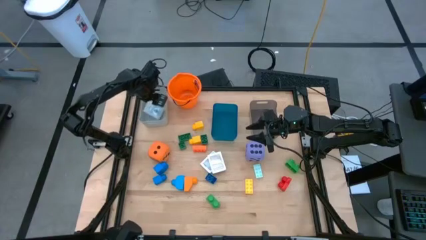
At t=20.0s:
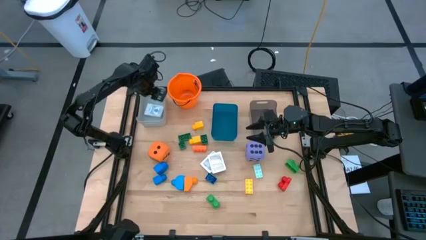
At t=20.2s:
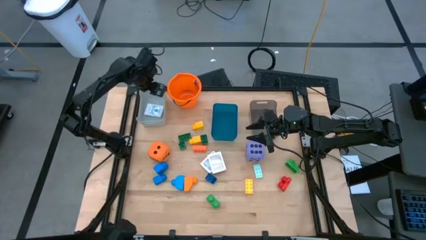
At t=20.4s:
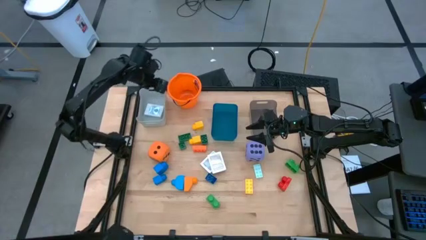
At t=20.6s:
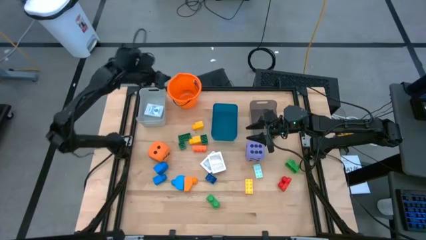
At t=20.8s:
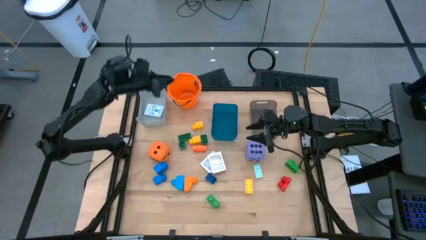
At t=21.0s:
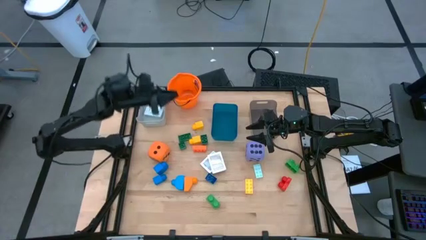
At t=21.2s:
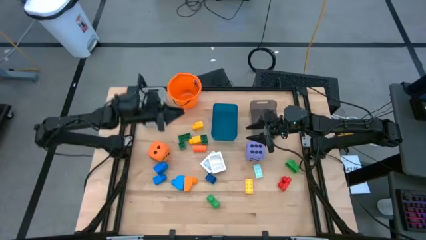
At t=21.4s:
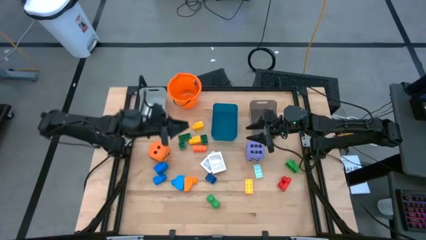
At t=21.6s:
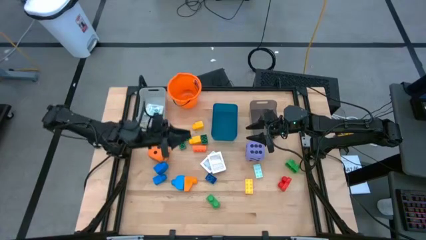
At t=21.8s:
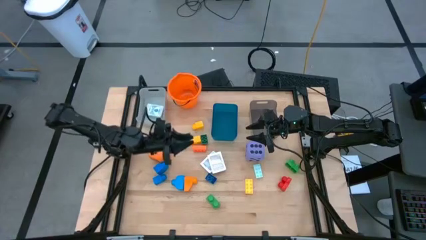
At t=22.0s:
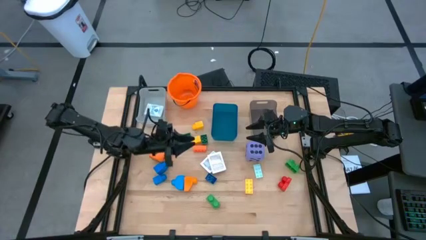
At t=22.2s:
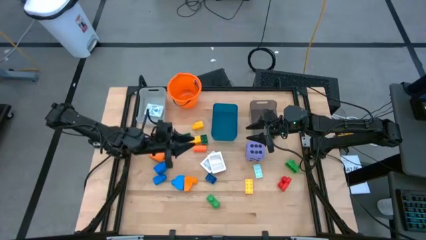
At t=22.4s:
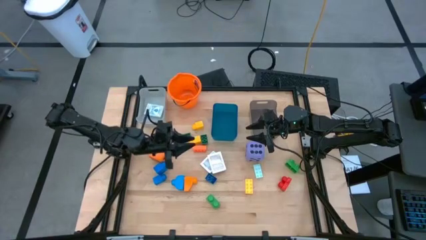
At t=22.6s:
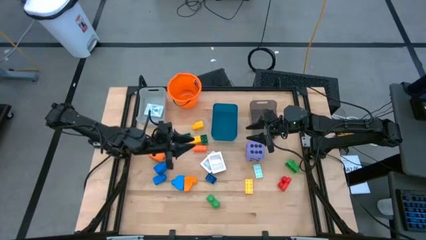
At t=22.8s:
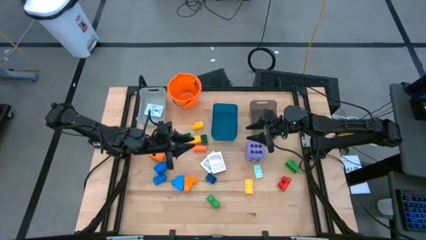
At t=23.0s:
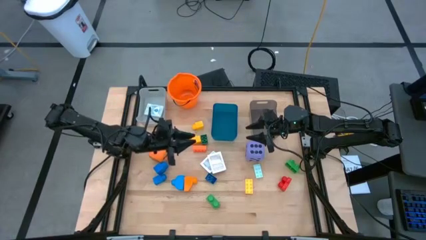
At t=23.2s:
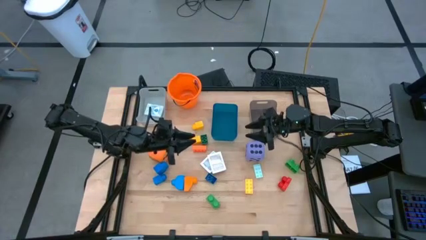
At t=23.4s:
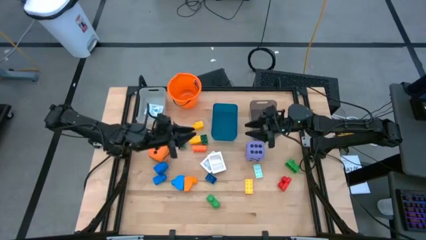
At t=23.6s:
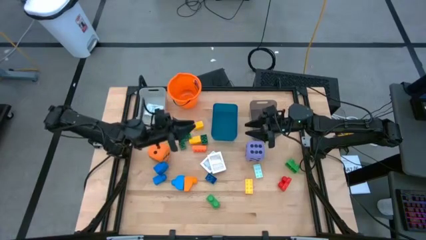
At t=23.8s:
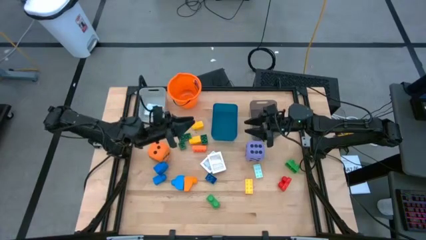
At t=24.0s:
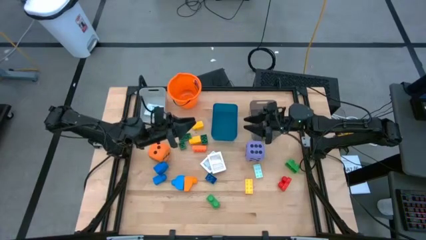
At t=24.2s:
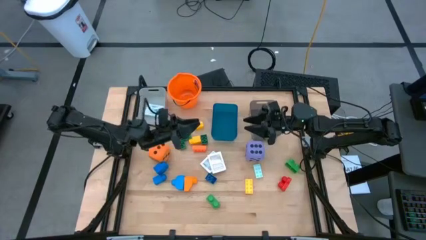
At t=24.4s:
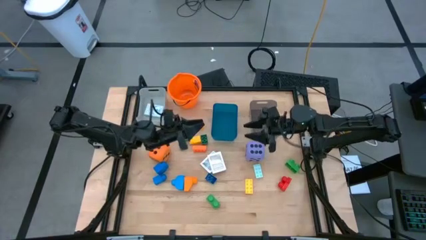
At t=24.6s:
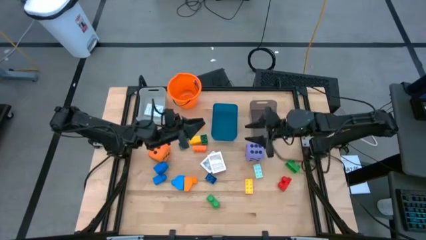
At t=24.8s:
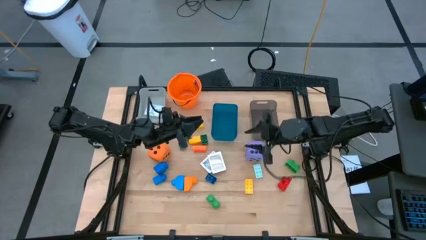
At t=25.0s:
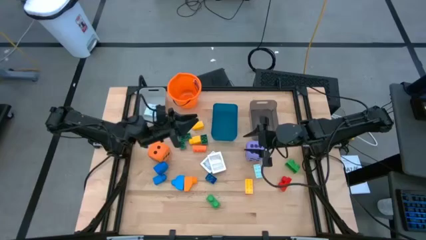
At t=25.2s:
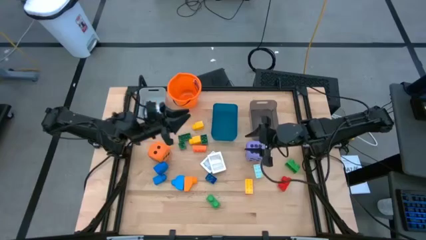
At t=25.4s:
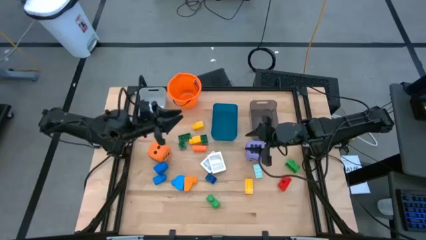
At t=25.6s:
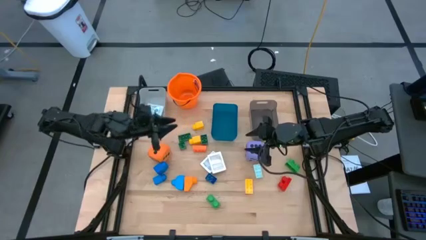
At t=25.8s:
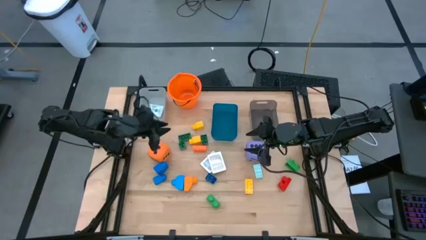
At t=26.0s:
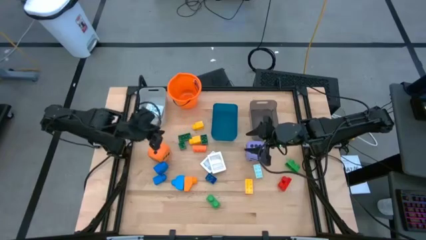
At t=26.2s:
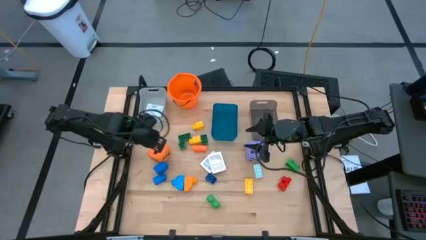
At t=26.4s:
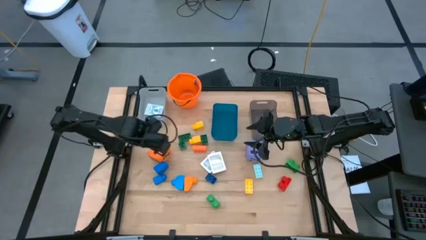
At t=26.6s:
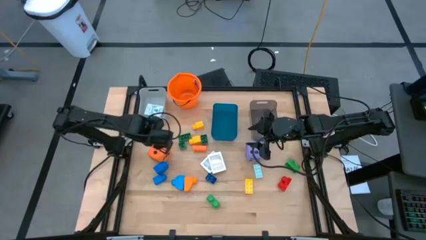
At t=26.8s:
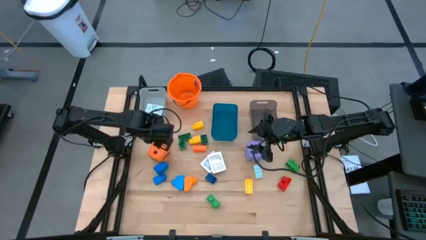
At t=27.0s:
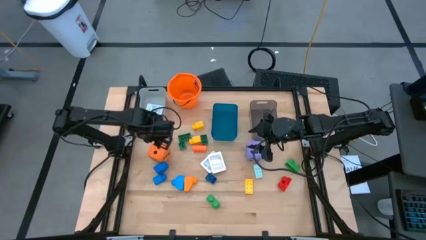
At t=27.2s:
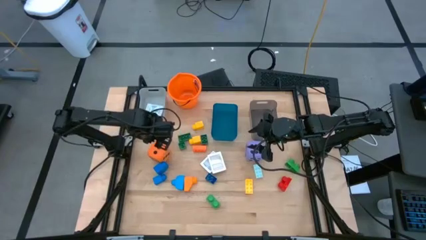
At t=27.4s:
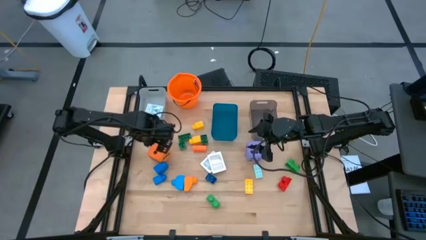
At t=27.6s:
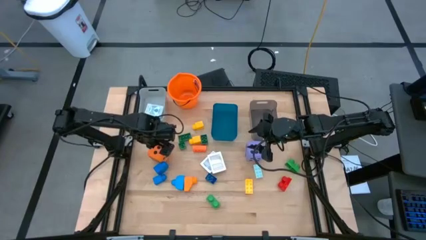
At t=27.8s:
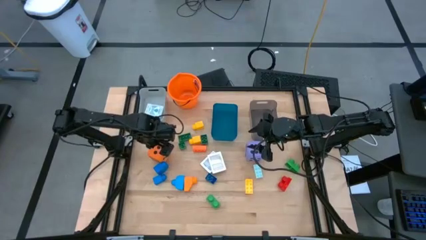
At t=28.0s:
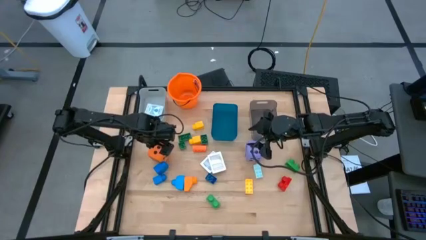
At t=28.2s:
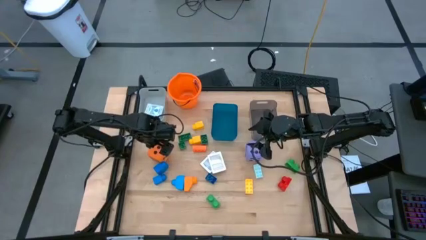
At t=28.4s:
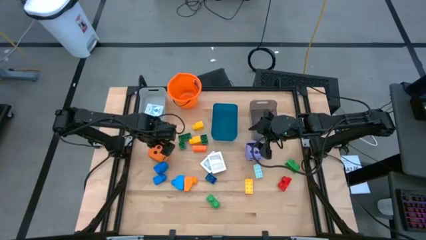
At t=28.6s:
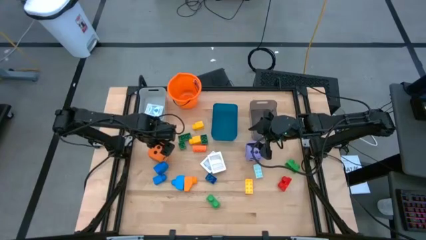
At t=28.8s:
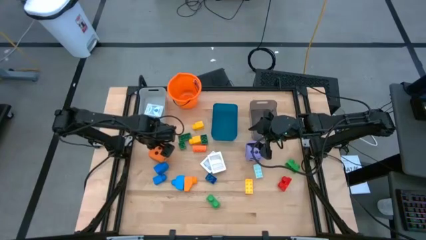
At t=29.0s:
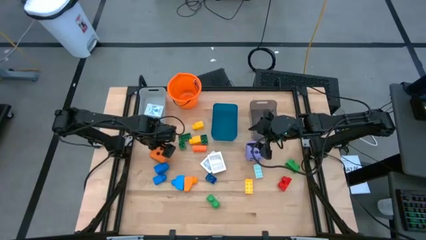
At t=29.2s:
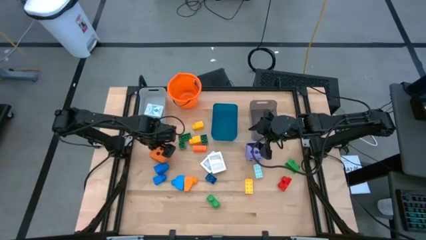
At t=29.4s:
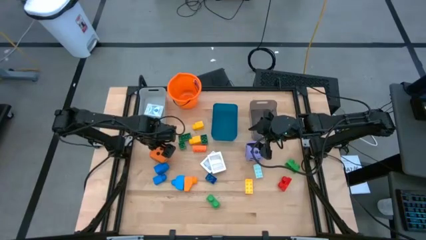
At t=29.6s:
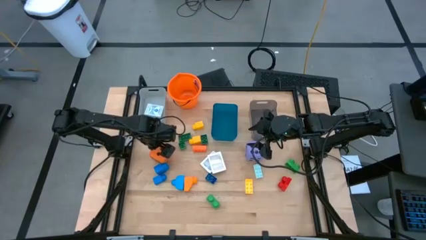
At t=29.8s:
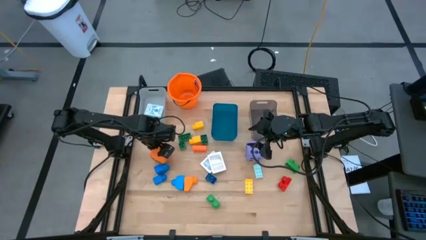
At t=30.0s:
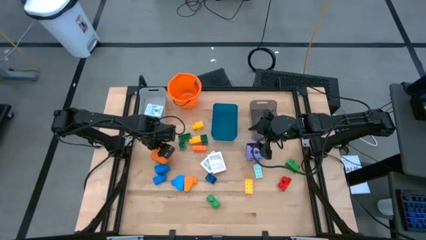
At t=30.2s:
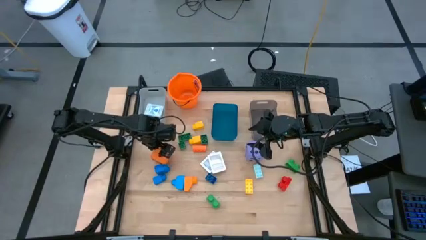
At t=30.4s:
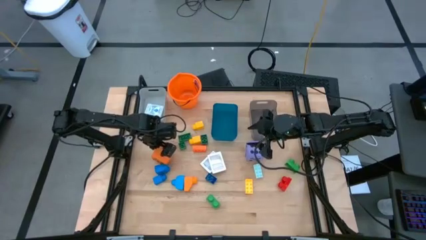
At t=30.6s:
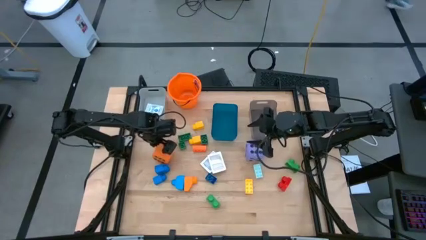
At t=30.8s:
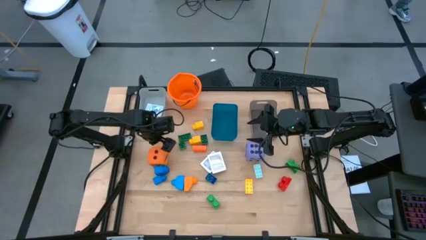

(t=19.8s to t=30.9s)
Task: Pick & Place Toys
Put the green game piece into the blue bin
